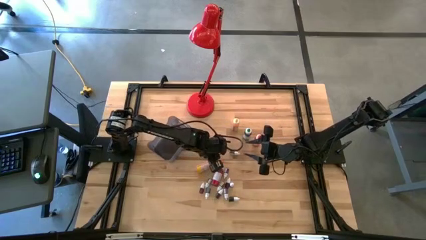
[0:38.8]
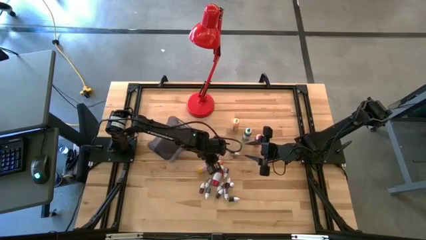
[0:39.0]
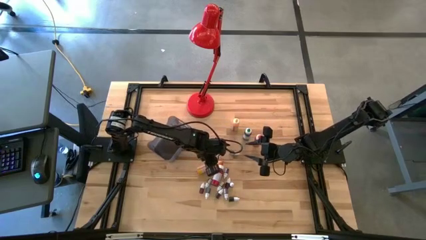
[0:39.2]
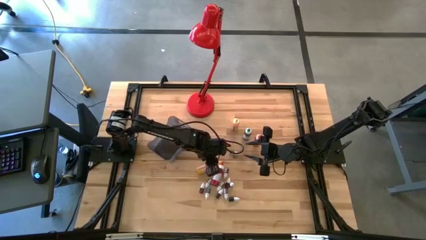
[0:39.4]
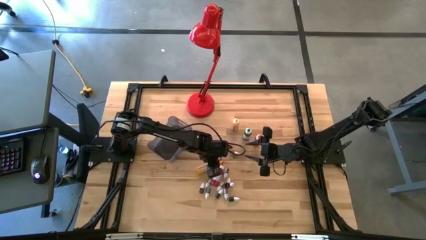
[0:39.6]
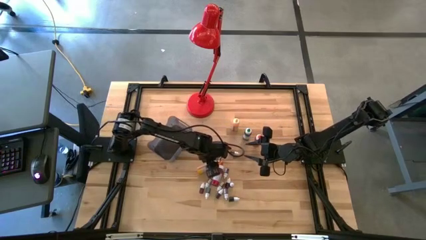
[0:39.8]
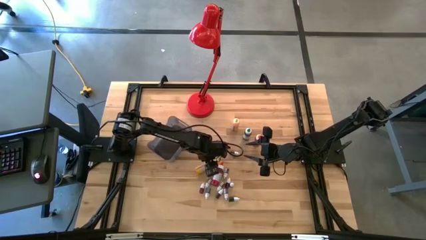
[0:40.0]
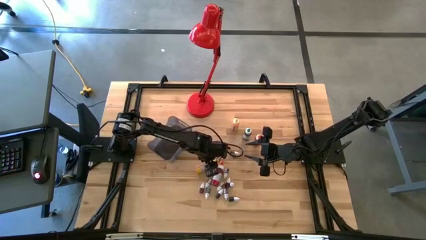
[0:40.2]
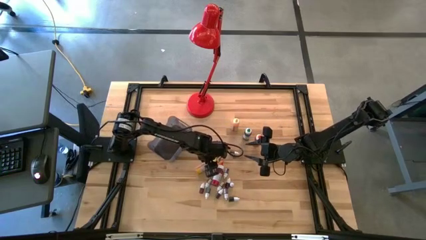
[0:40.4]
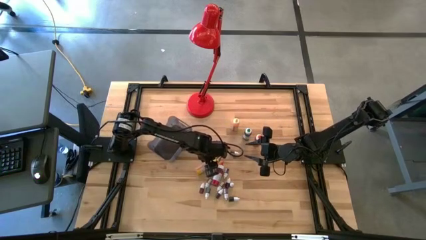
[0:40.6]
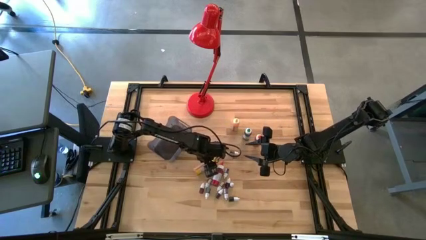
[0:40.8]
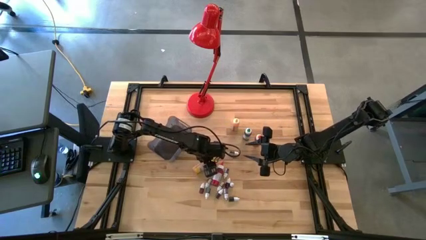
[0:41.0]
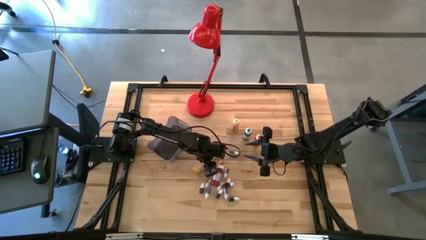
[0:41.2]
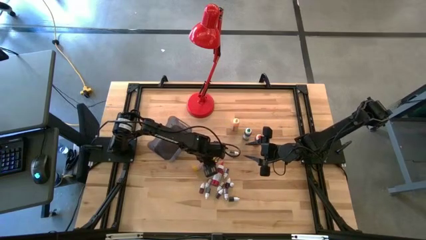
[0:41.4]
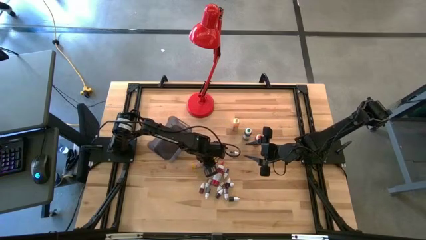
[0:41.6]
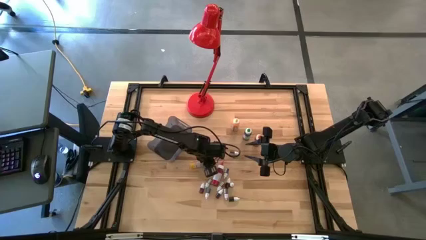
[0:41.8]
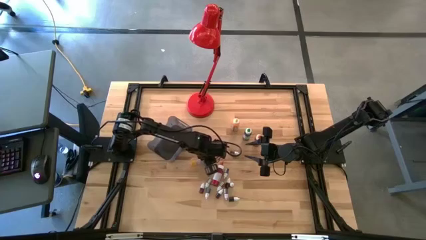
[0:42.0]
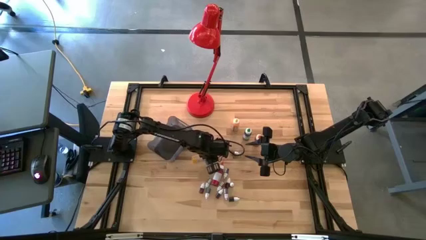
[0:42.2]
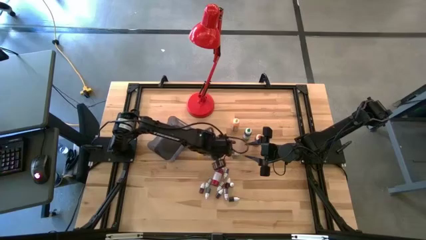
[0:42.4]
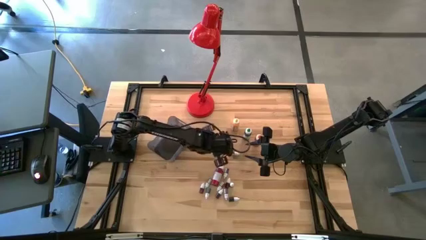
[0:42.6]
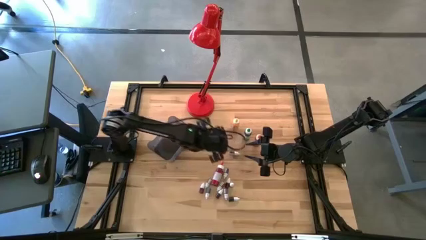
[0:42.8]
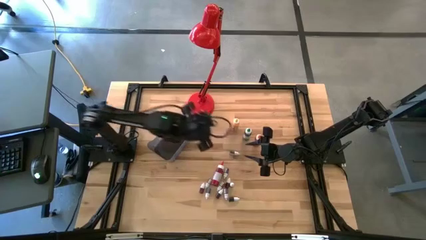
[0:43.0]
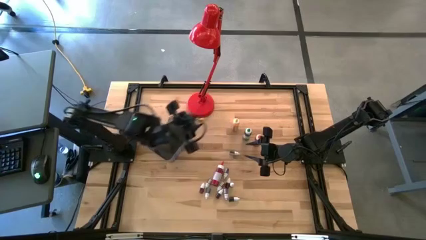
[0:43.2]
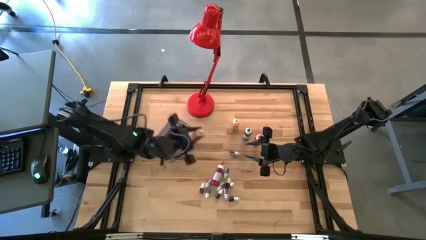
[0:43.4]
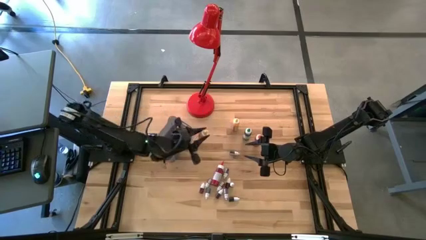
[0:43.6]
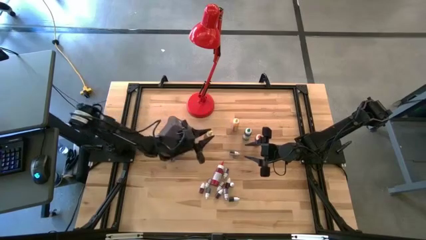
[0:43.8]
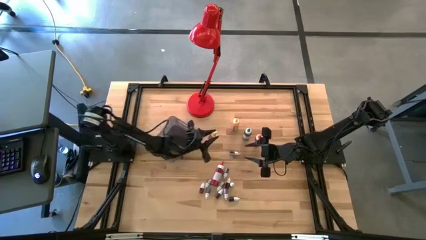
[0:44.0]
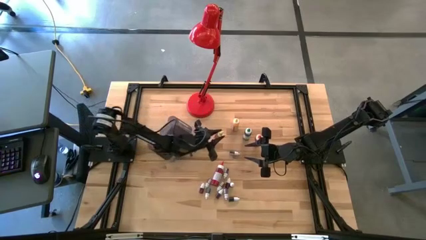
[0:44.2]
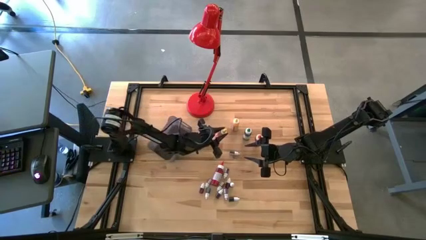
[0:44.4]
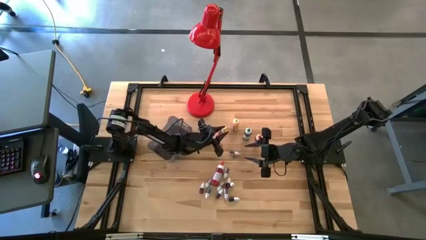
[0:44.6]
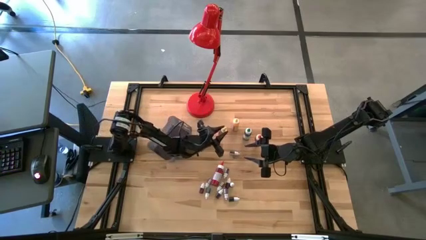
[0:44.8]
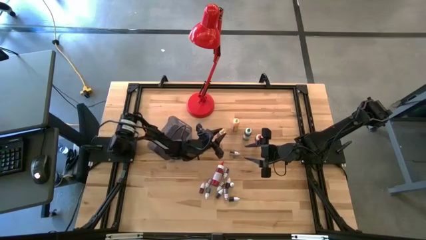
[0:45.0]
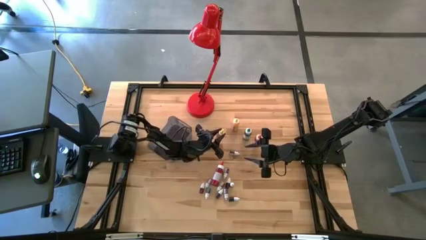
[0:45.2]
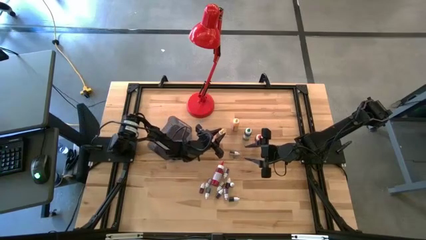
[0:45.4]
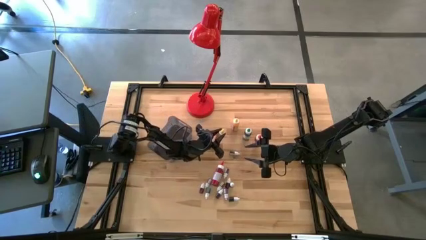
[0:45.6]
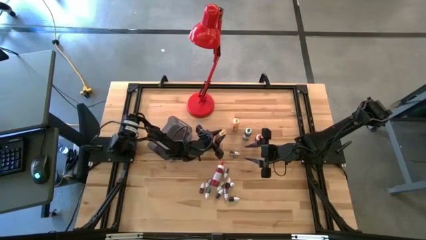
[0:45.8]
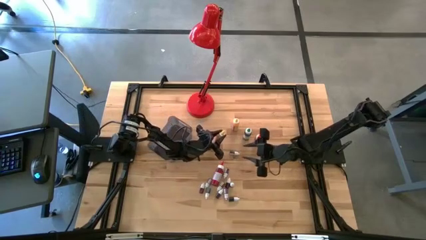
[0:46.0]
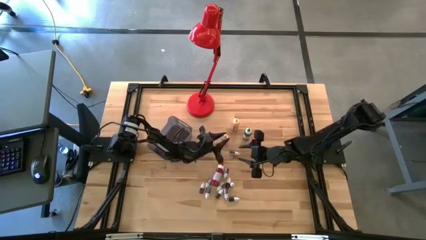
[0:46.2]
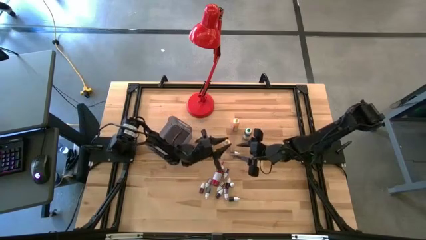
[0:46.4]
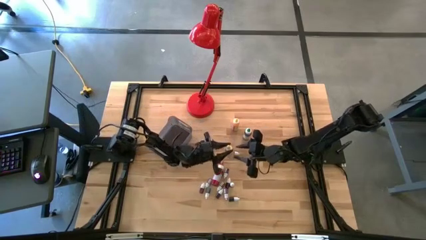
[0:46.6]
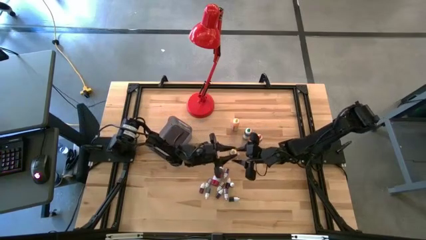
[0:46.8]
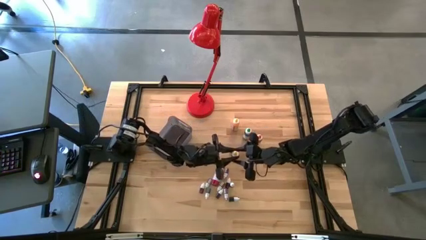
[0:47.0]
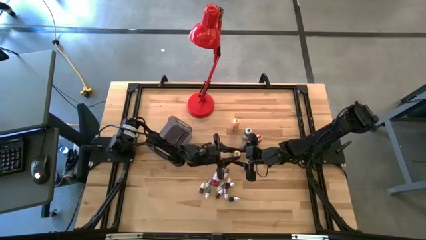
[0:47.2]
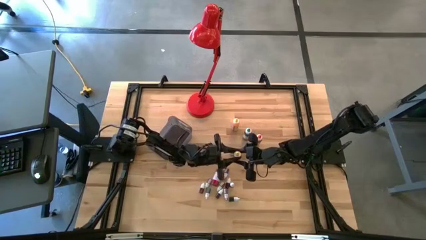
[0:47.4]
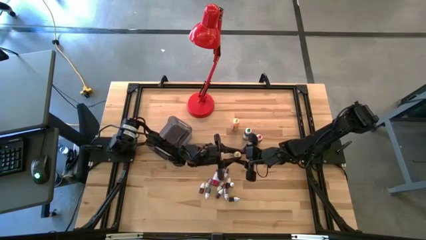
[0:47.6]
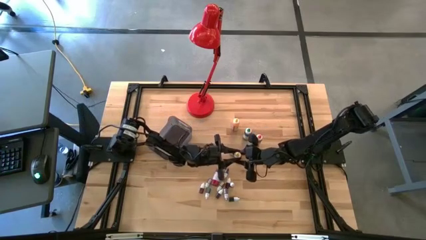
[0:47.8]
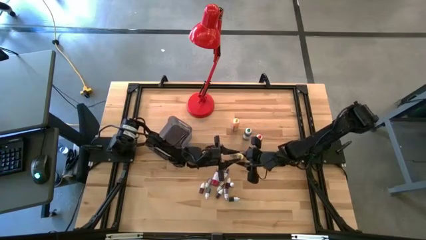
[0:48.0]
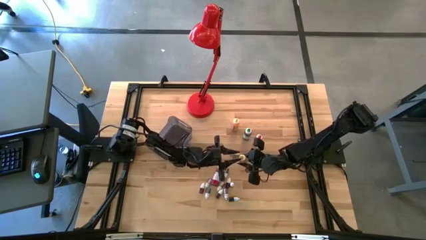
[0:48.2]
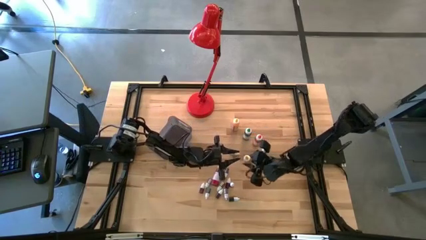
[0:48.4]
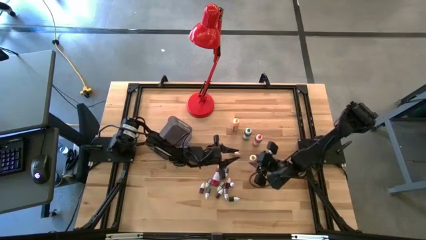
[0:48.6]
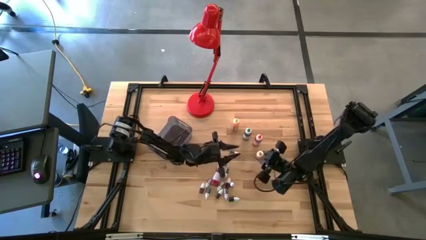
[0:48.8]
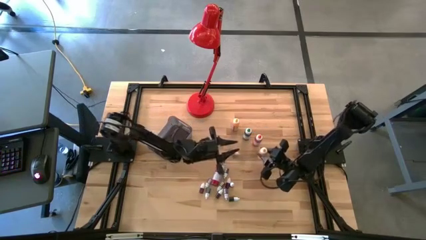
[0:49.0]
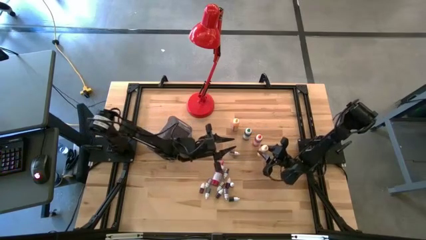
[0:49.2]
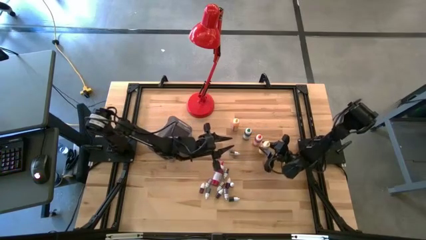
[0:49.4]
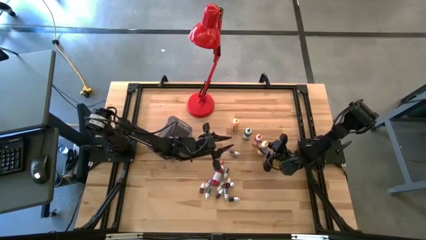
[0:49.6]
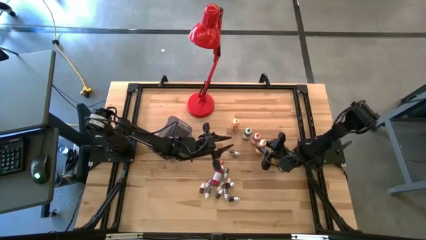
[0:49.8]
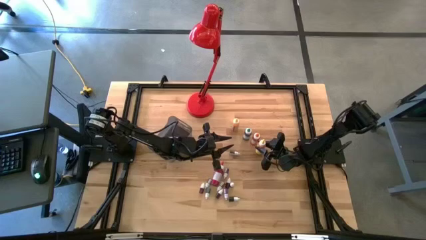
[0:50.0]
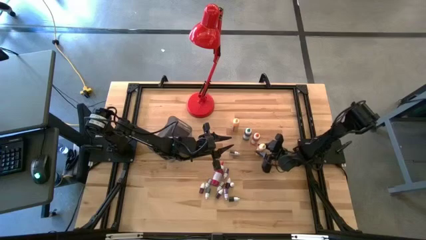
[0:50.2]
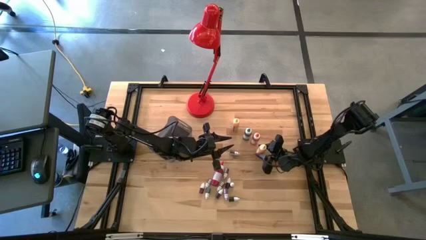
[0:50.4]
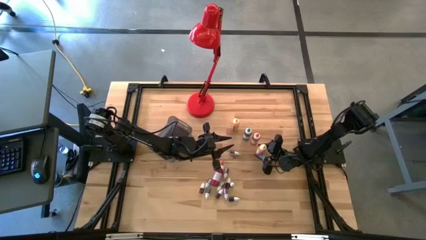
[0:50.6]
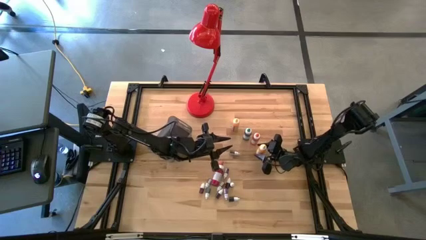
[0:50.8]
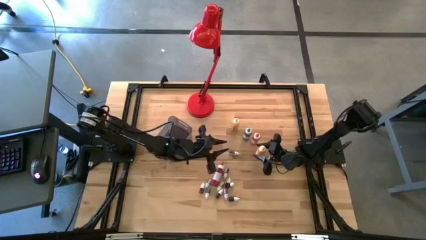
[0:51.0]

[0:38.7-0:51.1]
Task: Pick & Place food coloring
Move the large yellow food coloring bottle to the center of the table

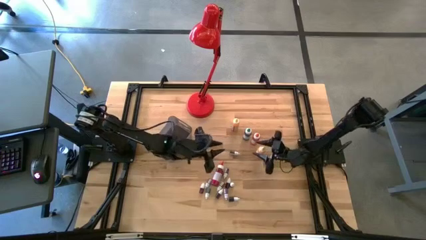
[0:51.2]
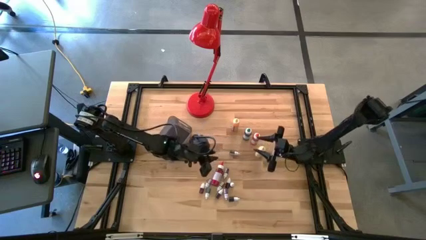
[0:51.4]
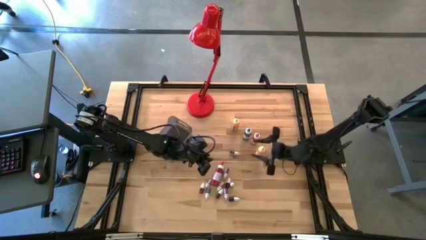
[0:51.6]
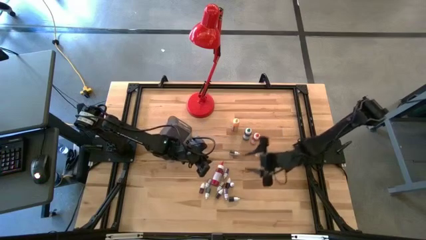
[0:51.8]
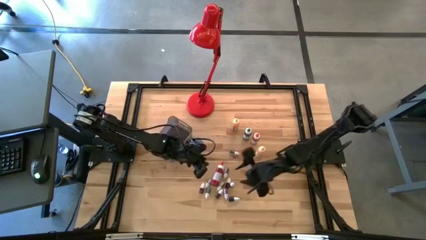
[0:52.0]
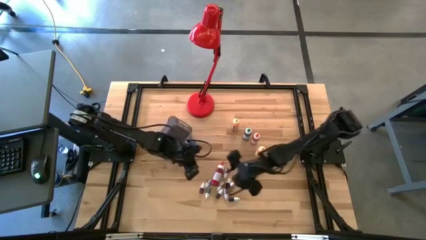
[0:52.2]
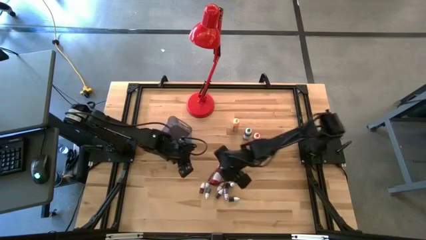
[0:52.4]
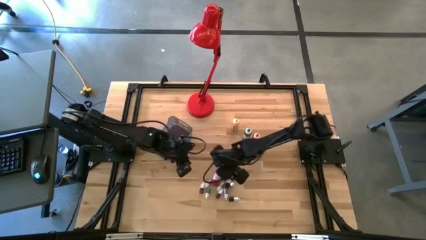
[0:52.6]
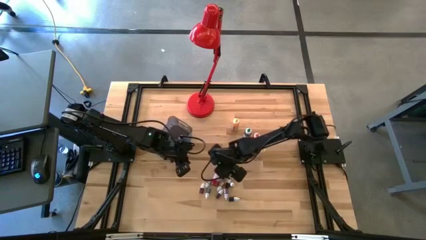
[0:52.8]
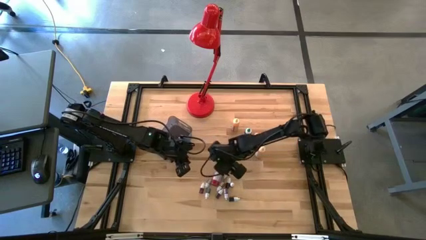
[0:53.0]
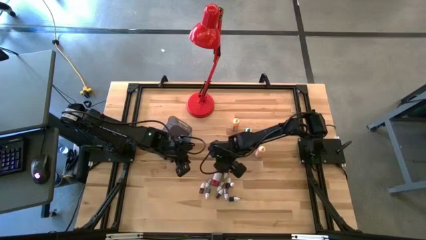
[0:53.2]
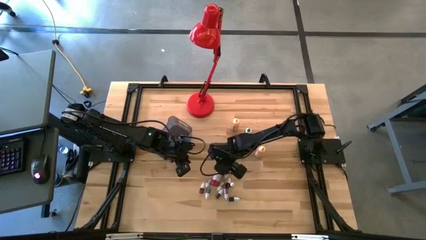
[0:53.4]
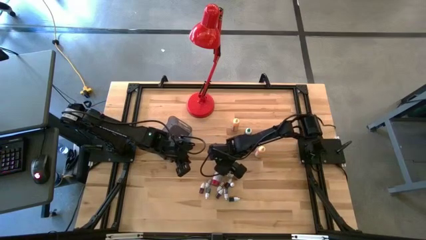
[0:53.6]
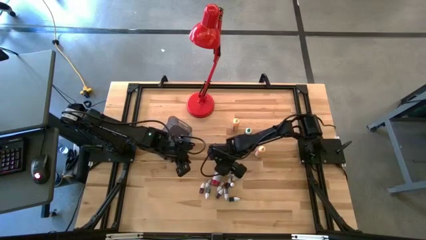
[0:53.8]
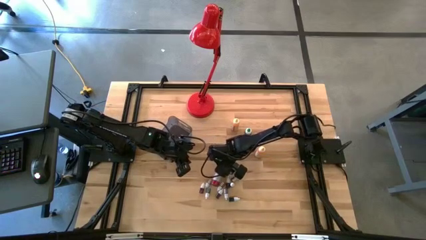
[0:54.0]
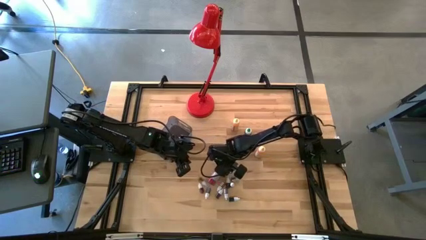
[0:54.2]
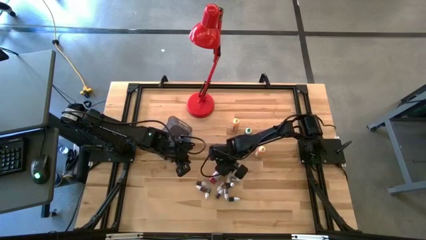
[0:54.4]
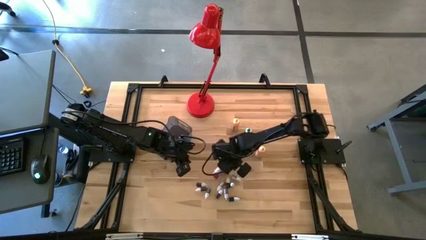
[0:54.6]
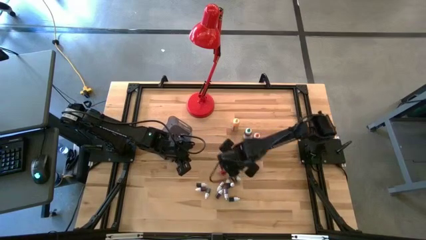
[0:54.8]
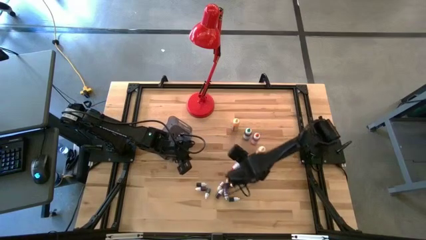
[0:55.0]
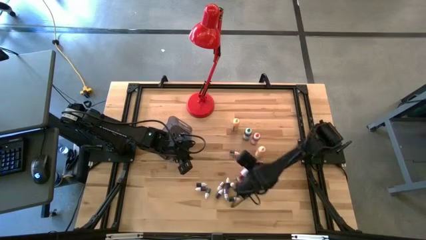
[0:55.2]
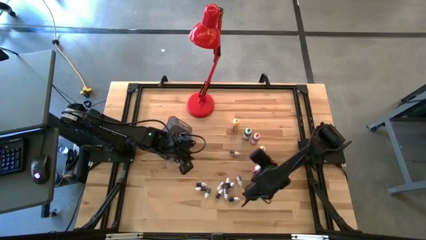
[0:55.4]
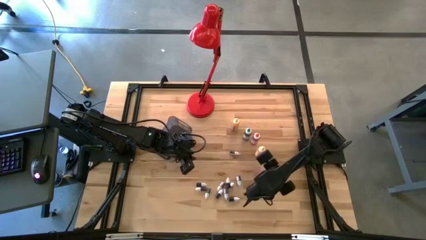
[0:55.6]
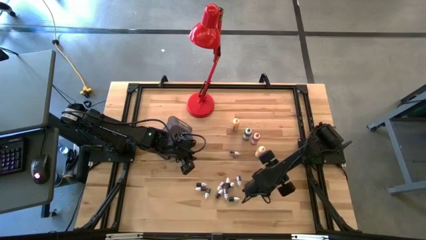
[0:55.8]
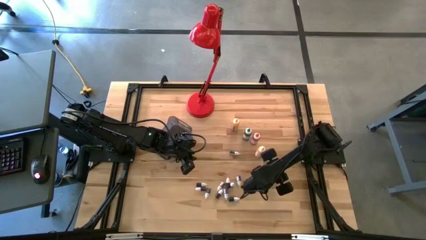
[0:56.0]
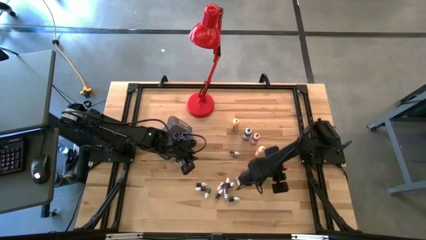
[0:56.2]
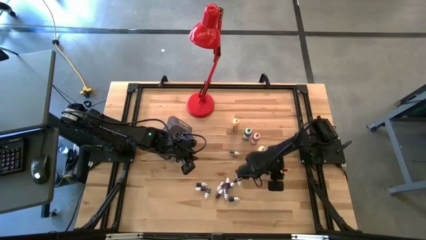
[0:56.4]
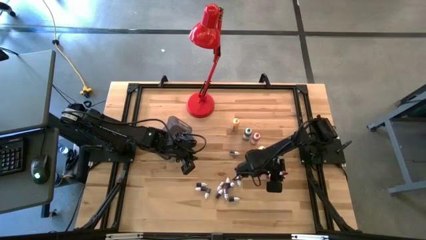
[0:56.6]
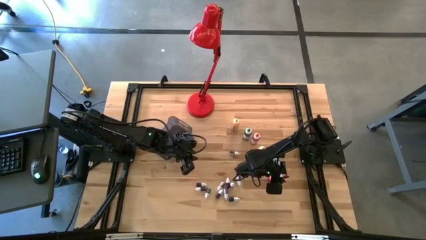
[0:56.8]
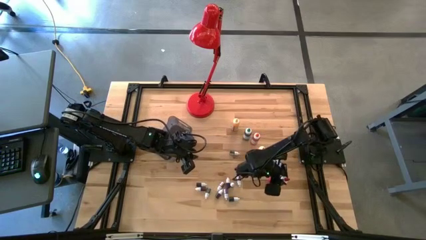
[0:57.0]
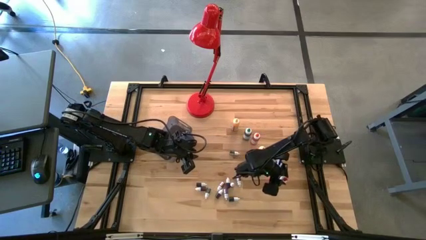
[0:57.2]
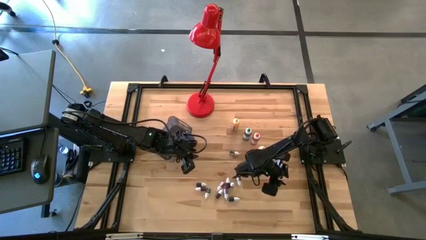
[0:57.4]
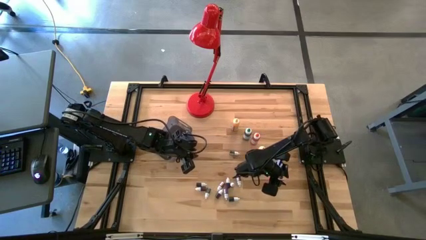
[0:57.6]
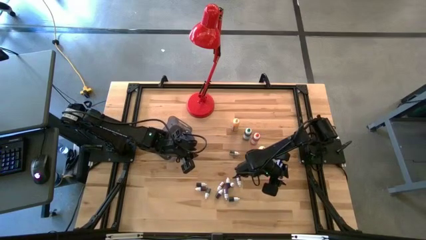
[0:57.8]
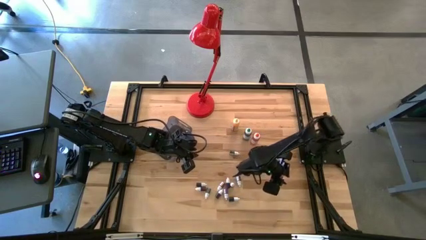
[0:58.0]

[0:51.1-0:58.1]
Move the large red food coloring bottle to the middle right of the table
